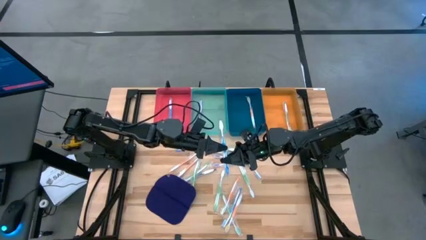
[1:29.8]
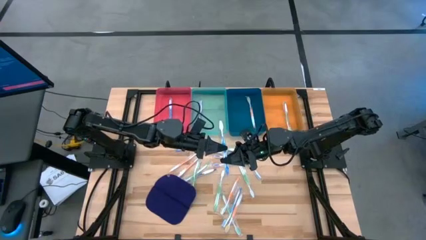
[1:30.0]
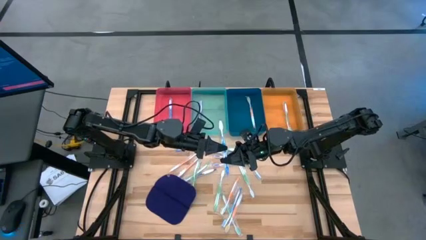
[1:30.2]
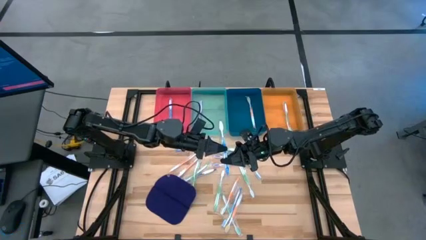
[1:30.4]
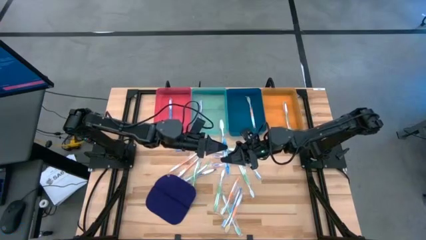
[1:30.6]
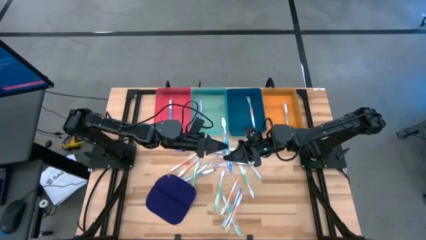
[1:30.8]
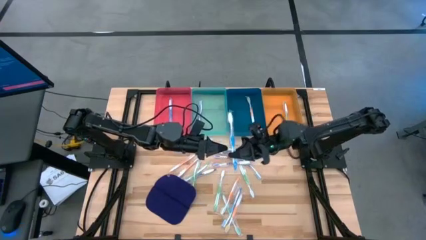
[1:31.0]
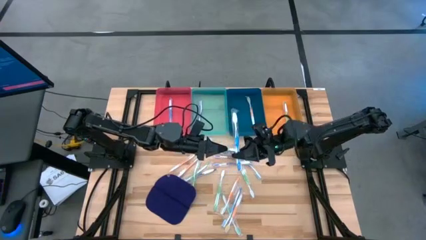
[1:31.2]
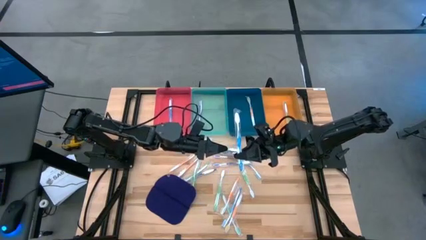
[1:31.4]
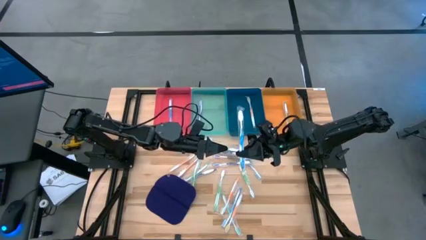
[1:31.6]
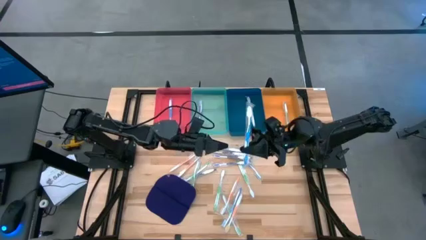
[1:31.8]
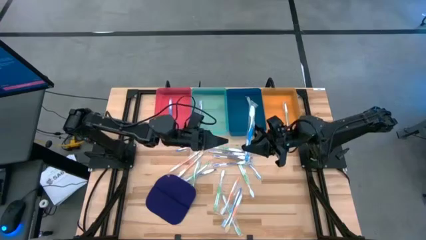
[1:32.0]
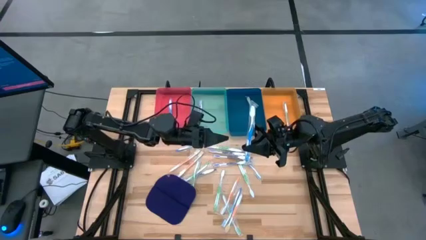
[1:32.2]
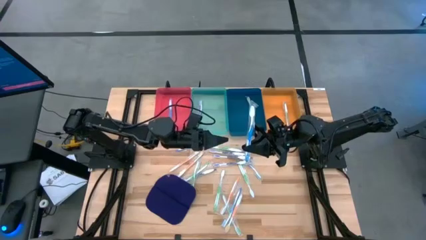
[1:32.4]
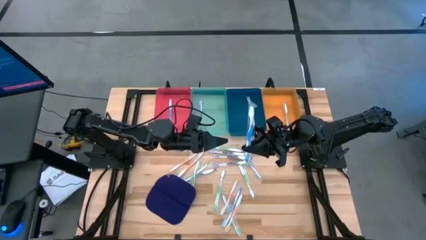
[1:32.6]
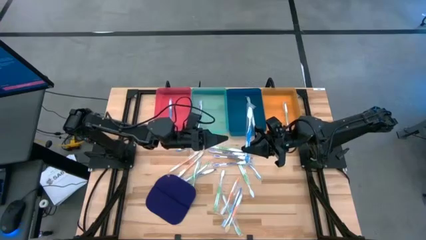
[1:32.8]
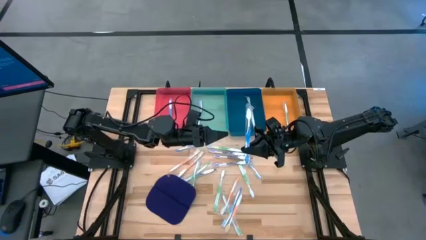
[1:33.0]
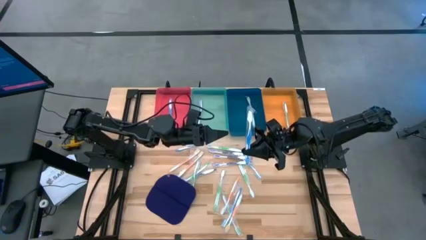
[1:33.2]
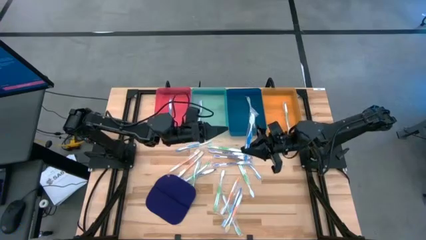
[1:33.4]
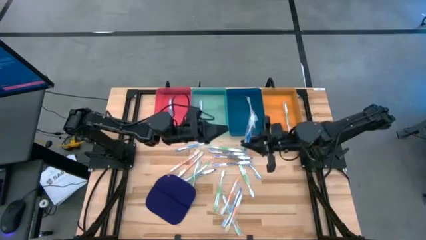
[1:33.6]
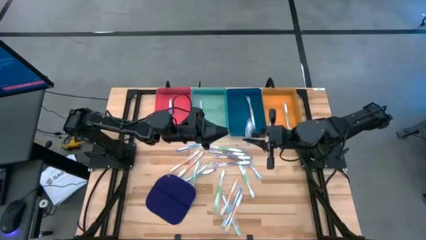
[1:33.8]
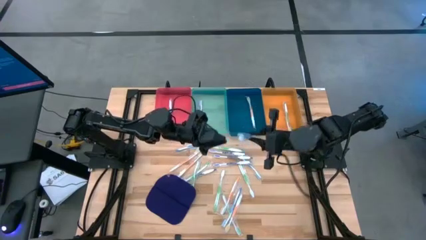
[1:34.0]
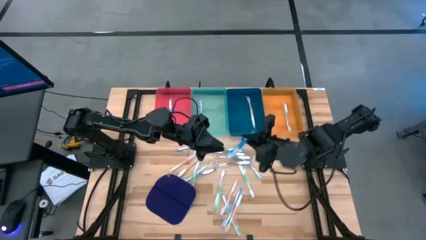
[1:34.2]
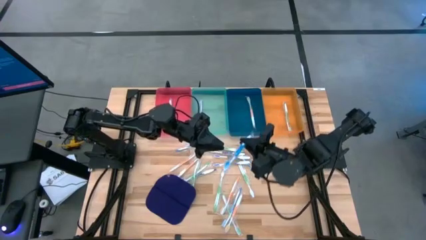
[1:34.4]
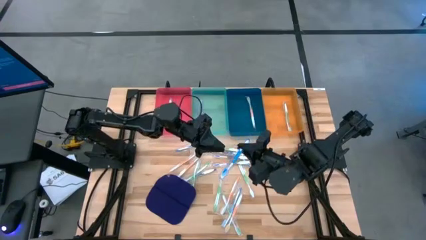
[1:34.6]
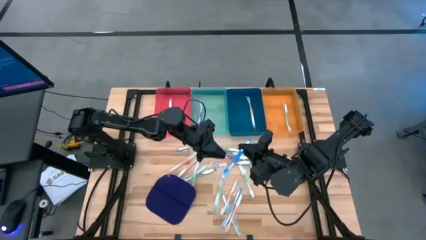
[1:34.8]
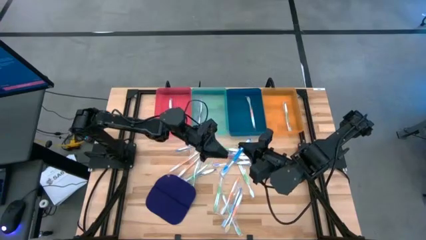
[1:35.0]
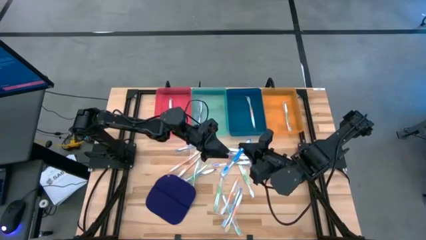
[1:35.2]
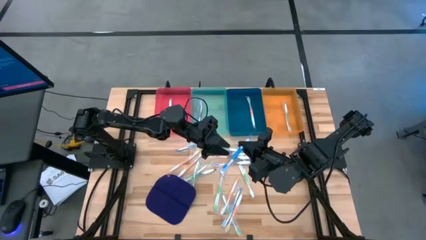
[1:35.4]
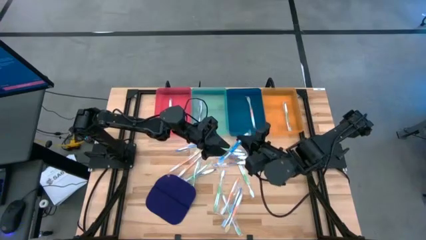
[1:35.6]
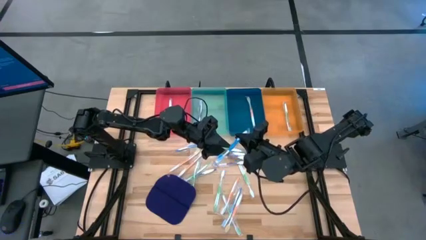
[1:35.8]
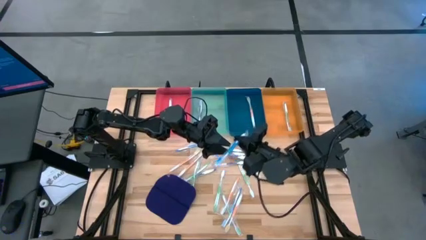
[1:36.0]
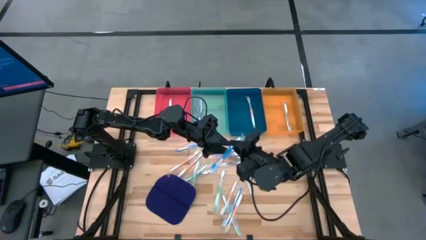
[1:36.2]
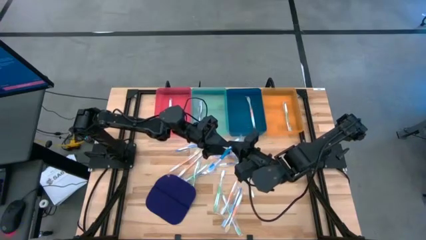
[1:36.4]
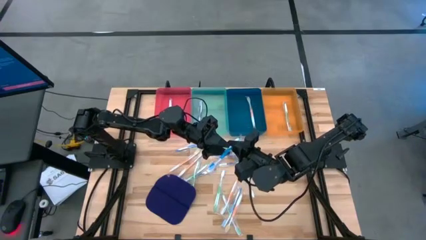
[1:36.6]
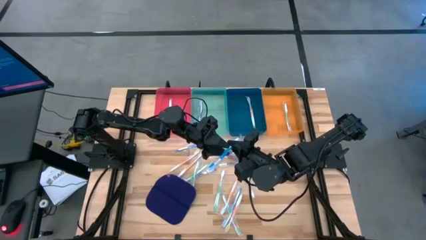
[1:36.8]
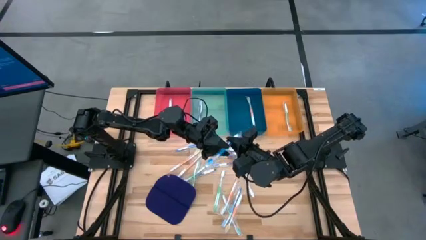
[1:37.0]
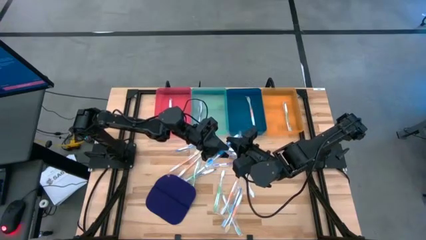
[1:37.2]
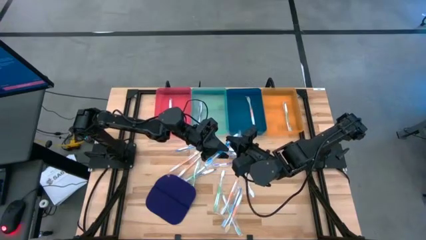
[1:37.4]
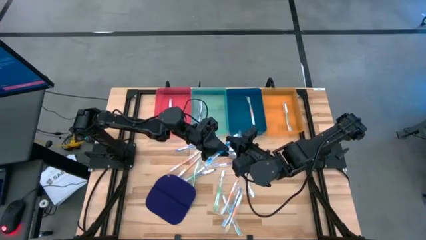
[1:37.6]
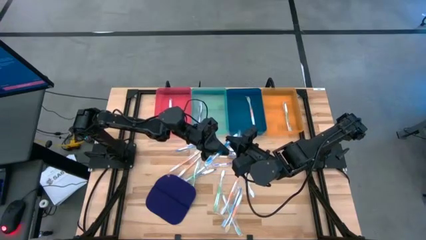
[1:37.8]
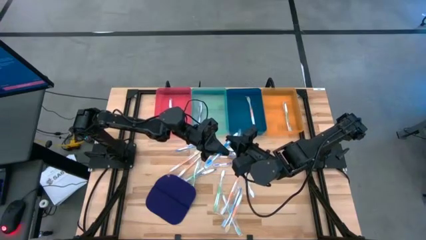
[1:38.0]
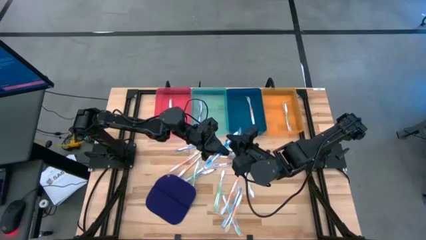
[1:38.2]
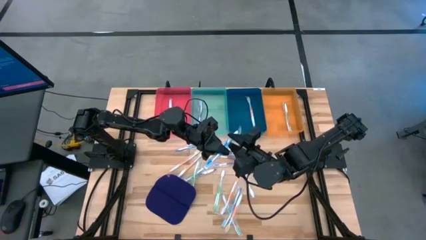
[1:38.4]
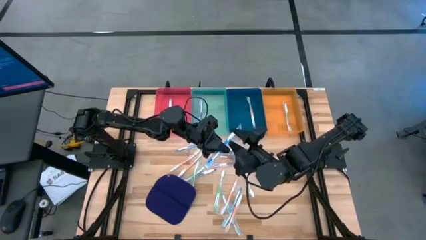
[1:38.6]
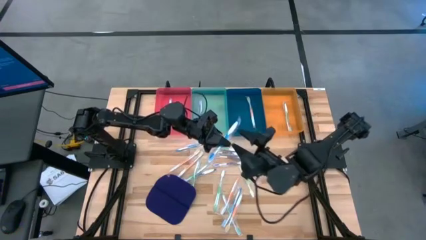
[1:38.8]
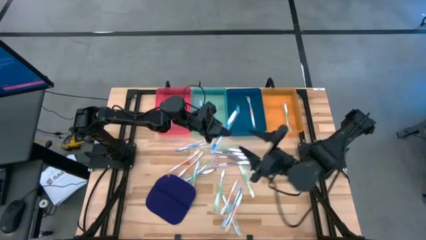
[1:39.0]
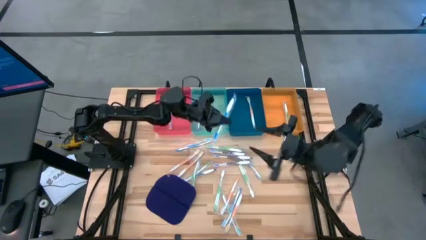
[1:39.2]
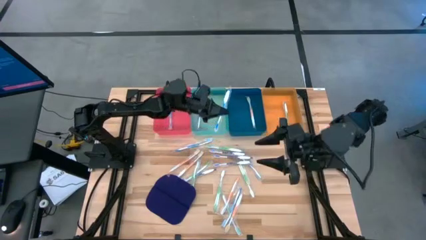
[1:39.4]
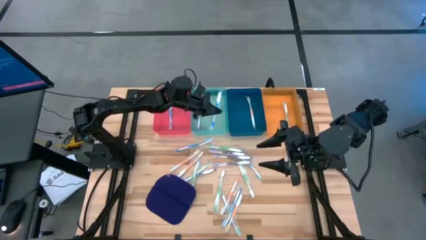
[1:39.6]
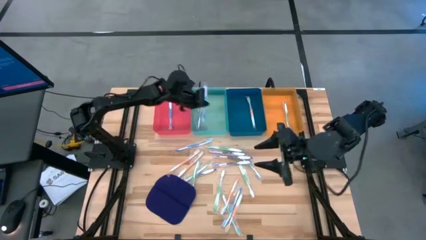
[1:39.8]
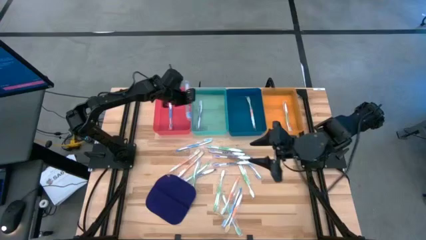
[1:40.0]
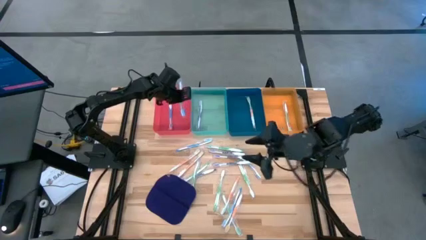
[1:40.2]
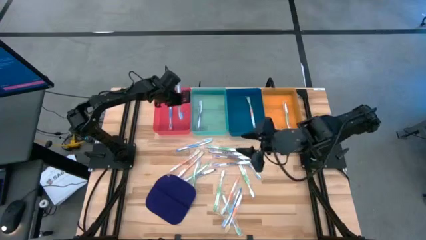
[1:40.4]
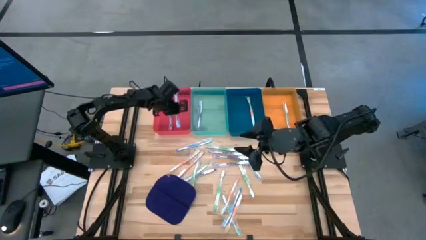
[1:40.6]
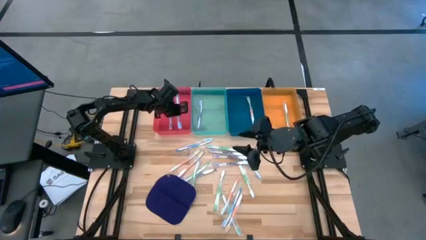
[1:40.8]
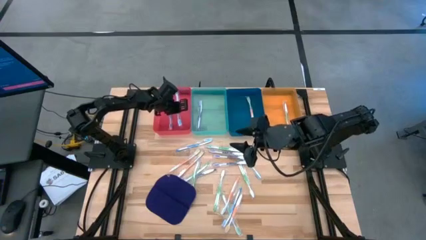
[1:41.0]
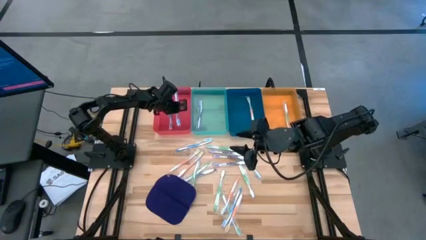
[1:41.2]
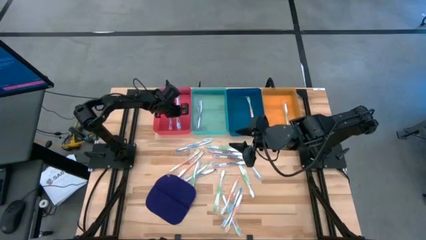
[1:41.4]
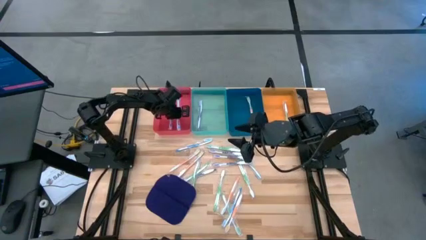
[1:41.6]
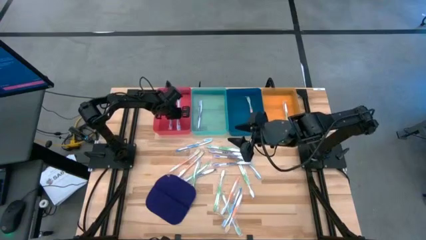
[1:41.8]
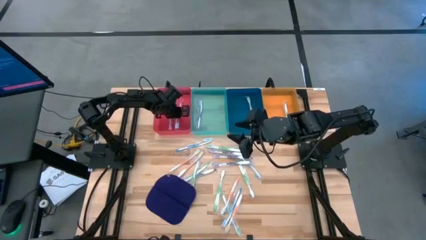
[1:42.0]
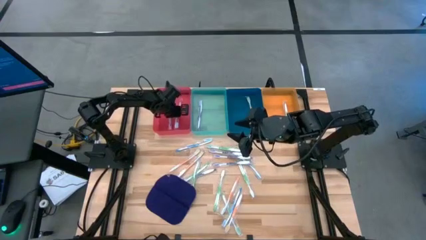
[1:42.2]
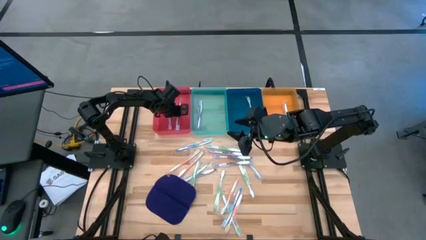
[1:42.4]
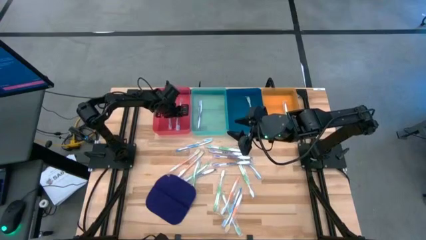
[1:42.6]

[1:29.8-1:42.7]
Task: Pick & Place Toothbrushes
Put the blue toothbrush into the red bin

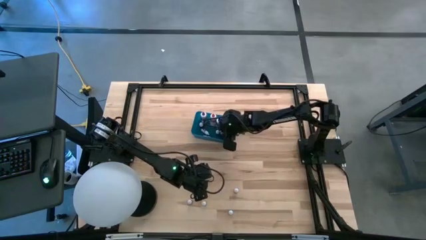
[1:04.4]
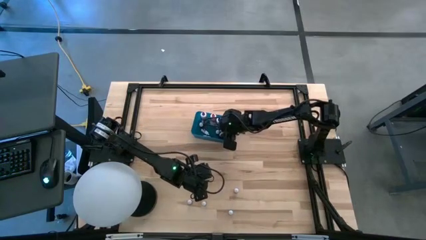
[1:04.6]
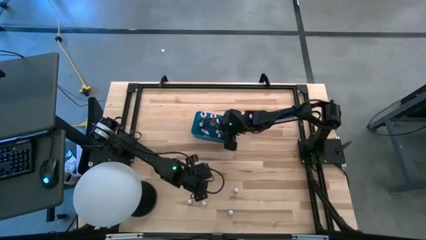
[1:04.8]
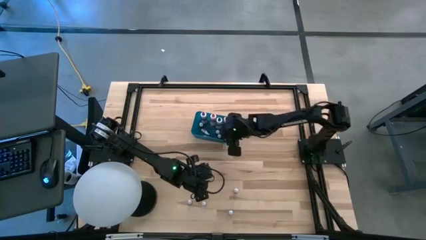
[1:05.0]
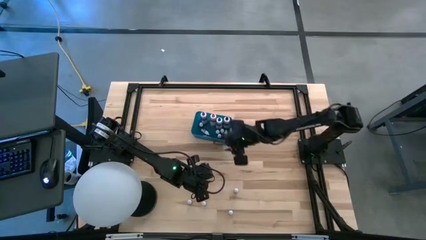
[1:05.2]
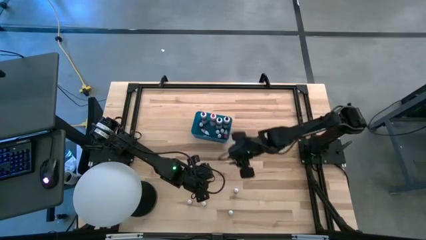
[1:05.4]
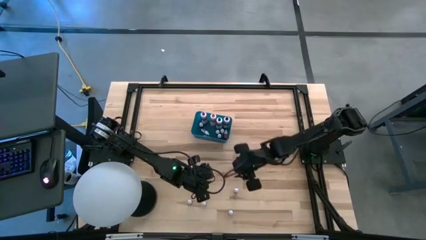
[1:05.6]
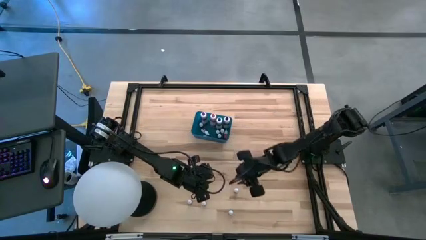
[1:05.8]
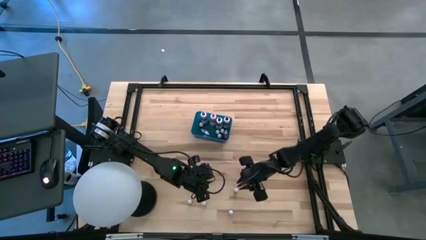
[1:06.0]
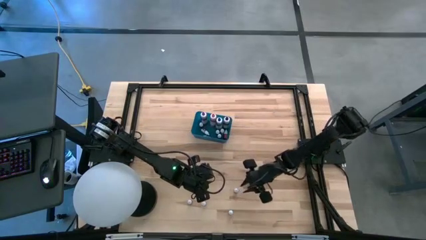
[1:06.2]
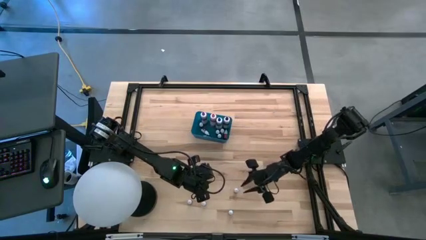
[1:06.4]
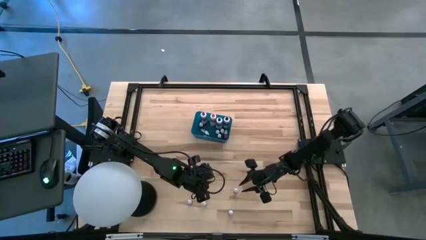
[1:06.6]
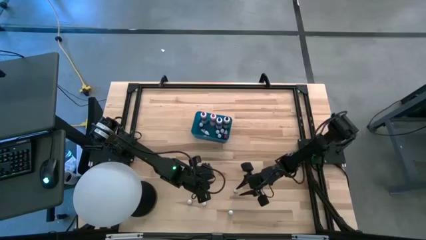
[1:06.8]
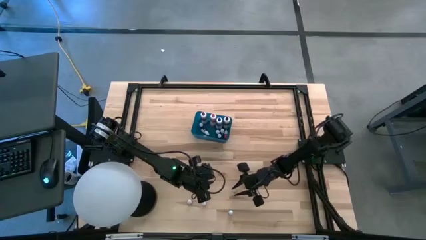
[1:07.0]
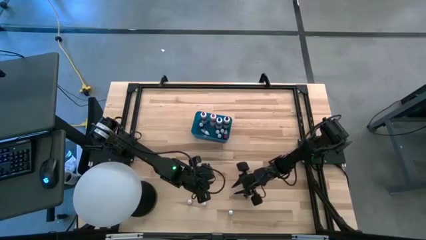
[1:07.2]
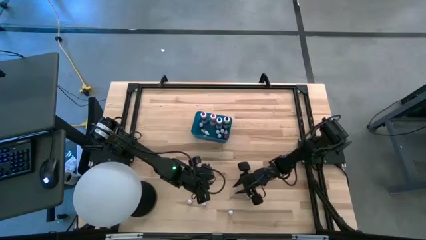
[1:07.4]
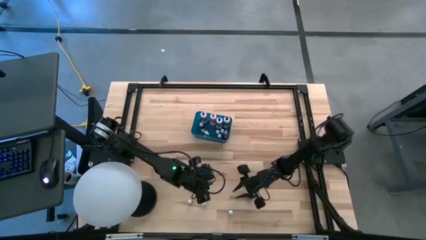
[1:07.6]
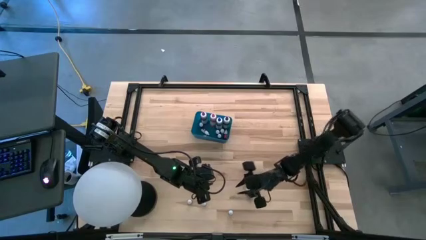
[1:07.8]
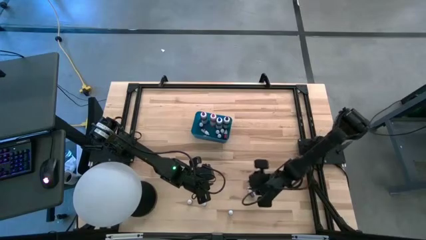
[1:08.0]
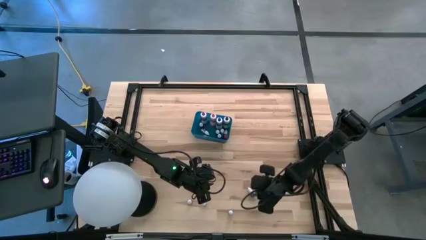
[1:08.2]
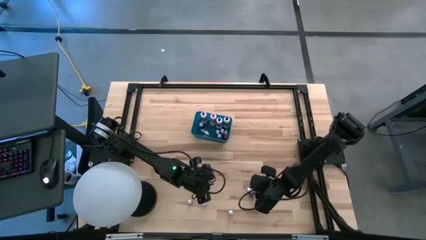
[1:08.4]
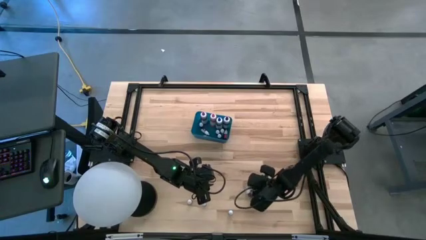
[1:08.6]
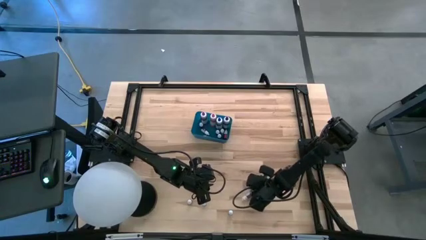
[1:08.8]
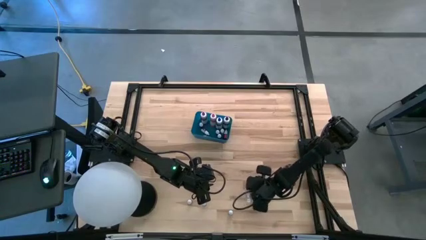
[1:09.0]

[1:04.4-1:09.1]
Task: Pick & Place food coloring
Put the purple food coloring bottle into the blue bin
